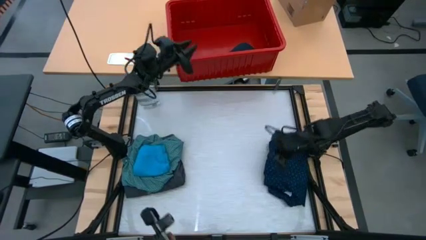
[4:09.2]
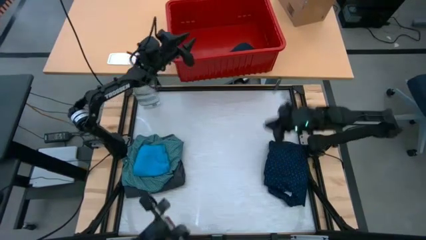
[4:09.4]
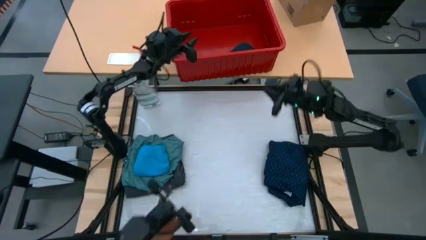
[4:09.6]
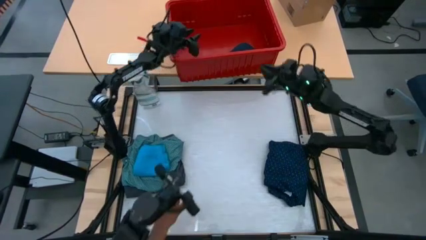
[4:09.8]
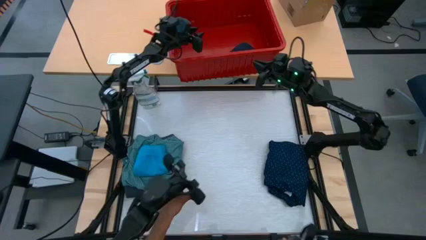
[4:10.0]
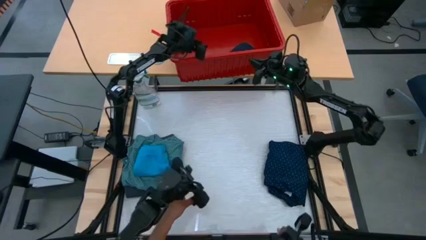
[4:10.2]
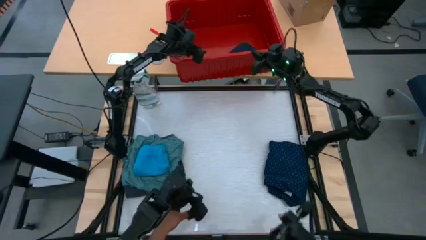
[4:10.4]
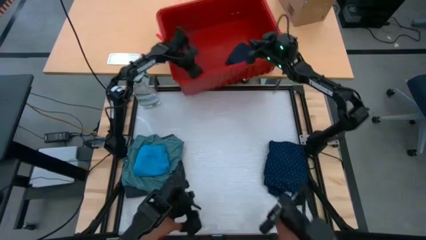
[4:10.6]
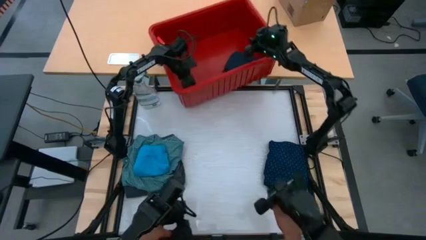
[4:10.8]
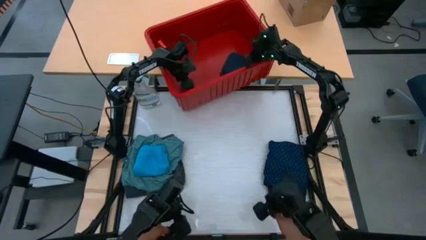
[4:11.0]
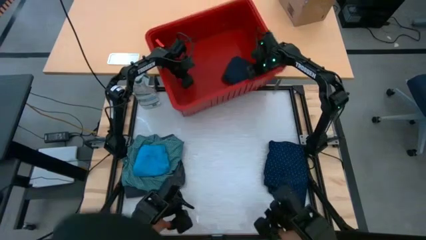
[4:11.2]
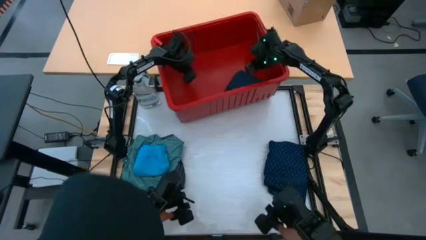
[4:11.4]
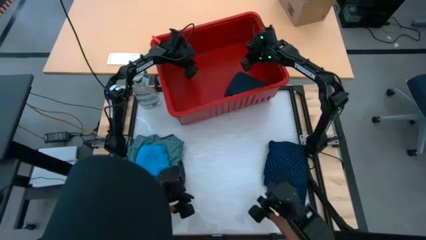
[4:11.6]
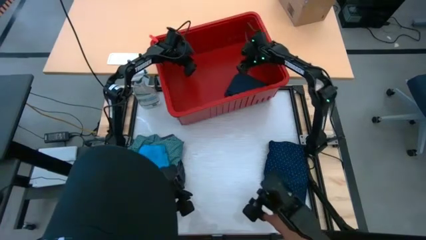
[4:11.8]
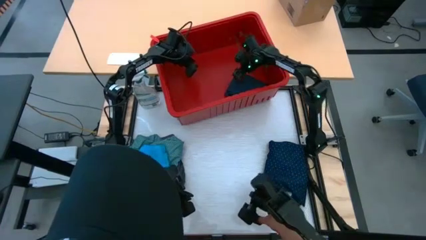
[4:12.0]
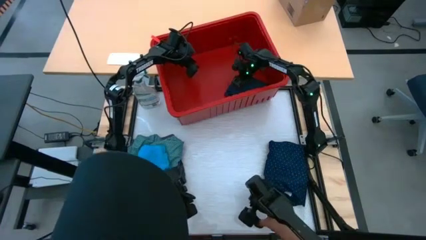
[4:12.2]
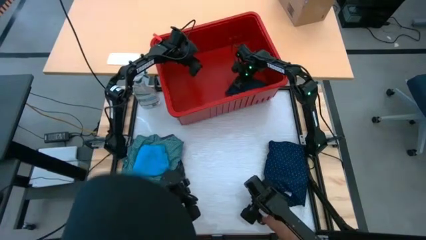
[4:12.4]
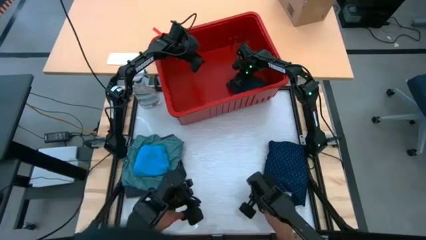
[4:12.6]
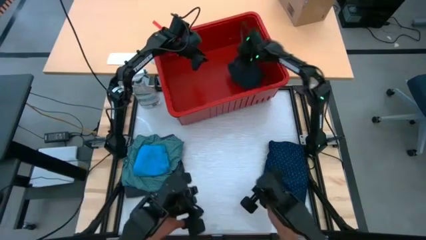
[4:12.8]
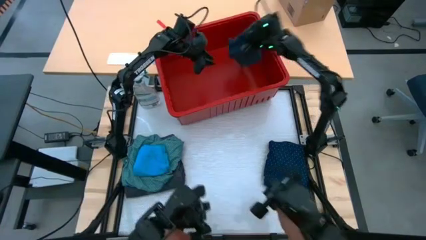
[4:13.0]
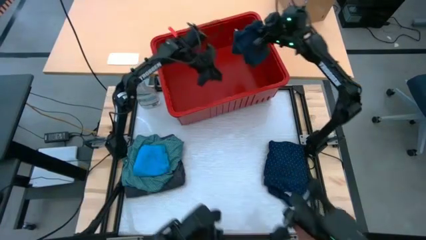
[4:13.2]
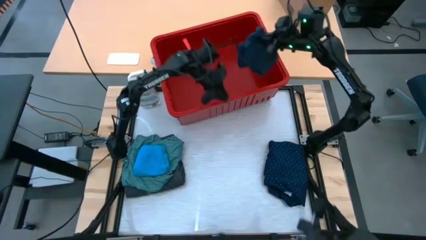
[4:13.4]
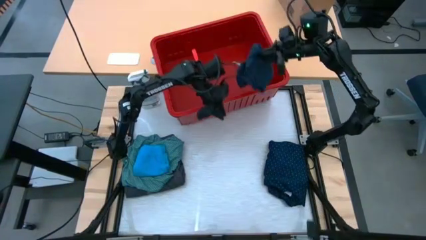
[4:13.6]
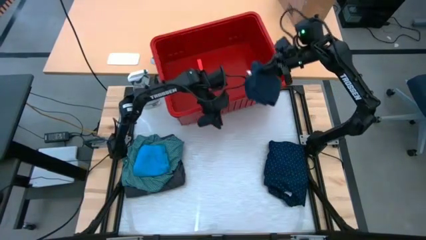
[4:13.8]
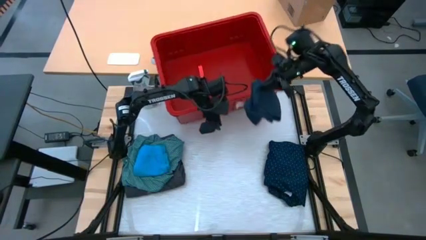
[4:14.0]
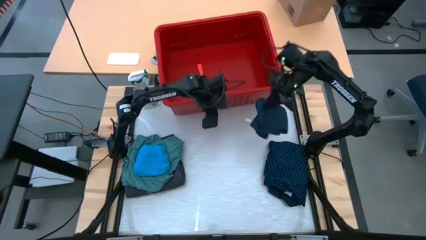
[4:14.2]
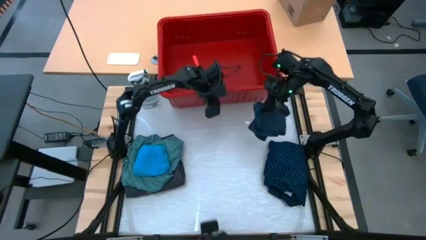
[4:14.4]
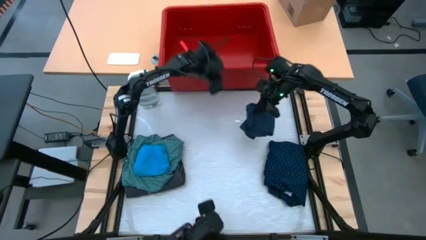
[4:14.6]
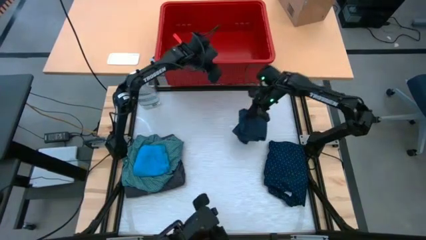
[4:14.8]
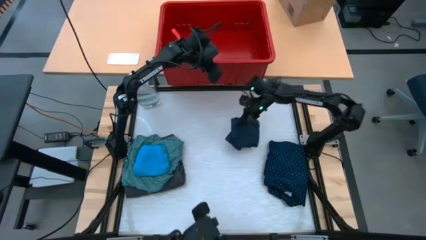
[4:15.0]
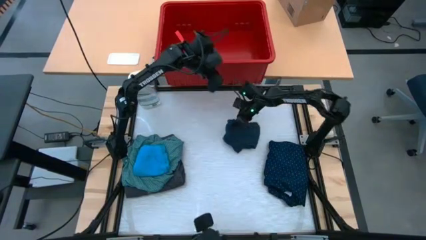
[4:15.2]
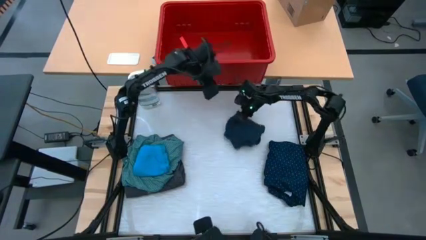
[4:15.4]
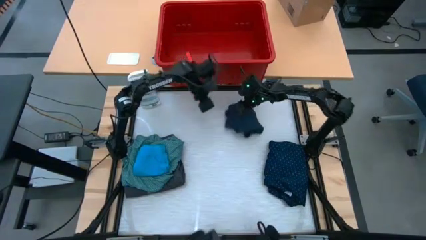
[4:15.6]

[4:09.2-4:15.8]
Task: Fold laundry
Remove the dark blue shorts from the red bin

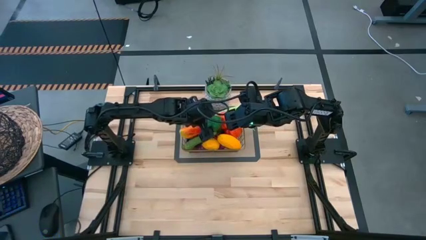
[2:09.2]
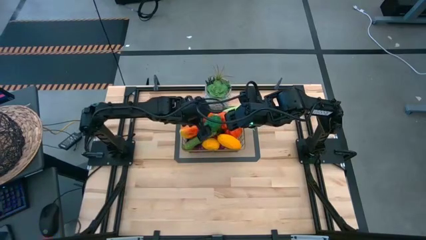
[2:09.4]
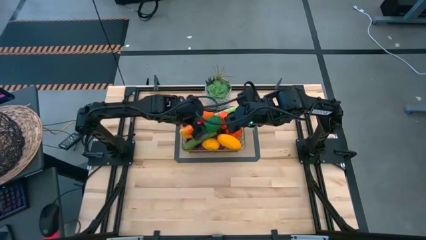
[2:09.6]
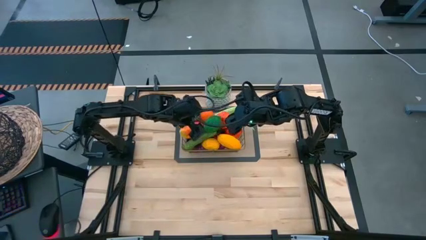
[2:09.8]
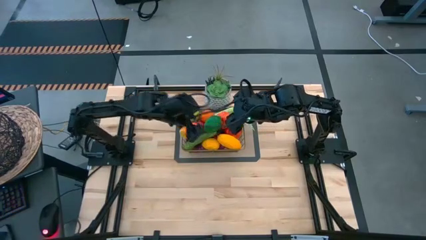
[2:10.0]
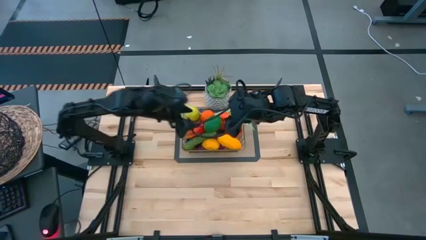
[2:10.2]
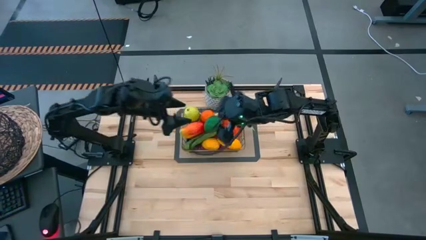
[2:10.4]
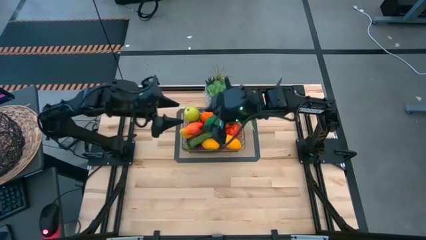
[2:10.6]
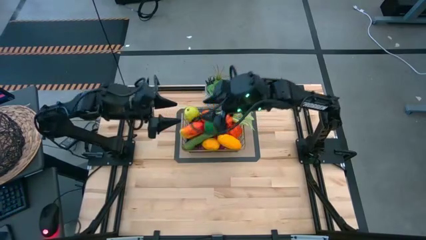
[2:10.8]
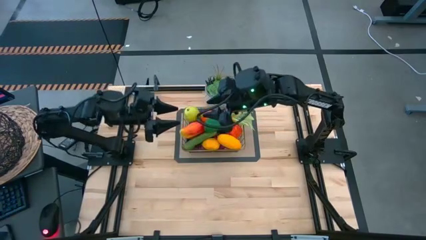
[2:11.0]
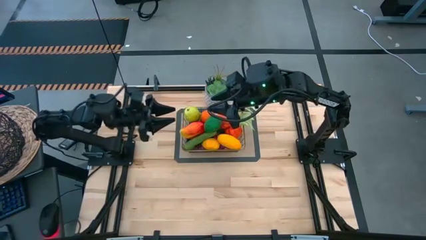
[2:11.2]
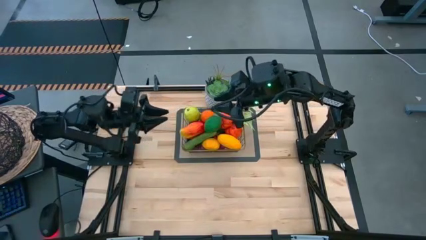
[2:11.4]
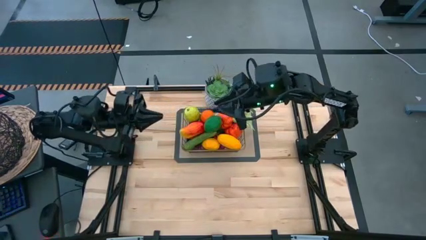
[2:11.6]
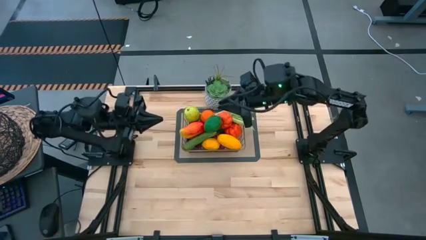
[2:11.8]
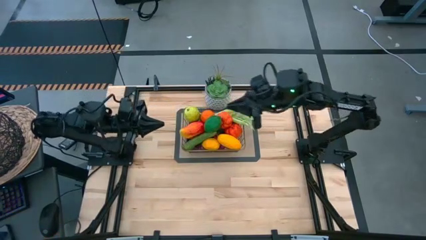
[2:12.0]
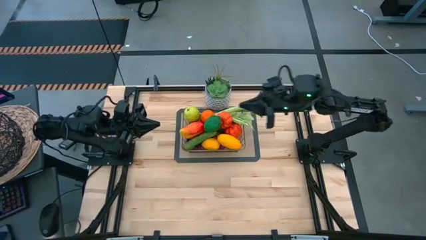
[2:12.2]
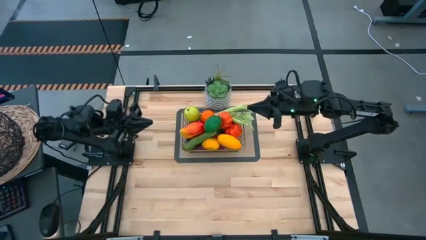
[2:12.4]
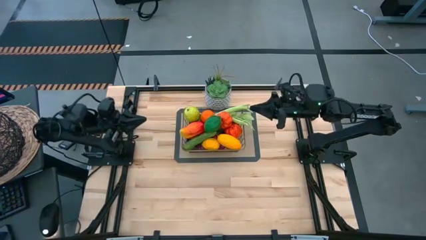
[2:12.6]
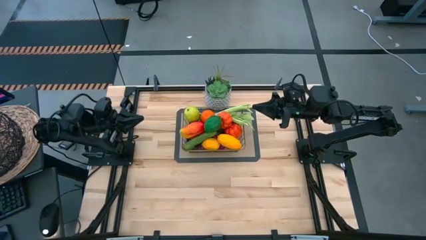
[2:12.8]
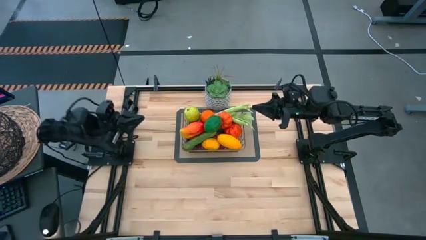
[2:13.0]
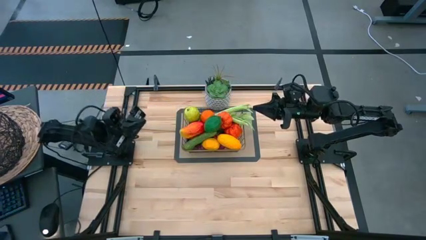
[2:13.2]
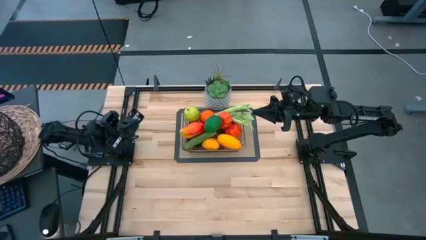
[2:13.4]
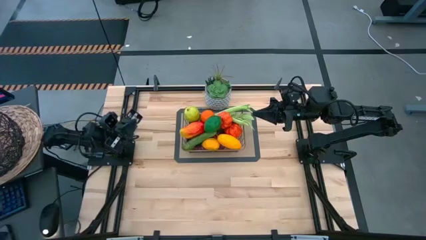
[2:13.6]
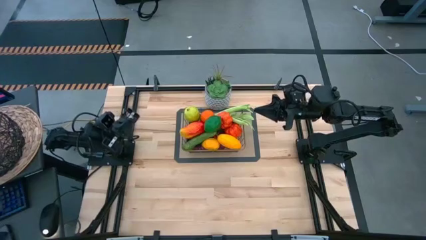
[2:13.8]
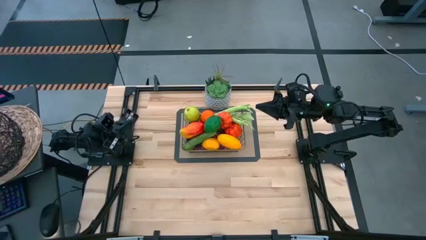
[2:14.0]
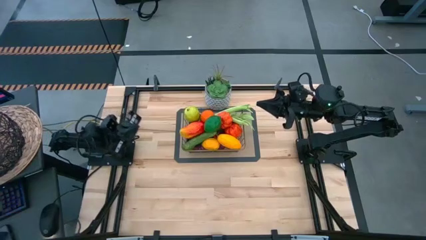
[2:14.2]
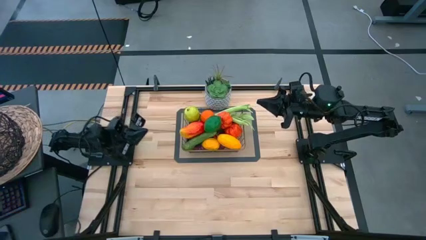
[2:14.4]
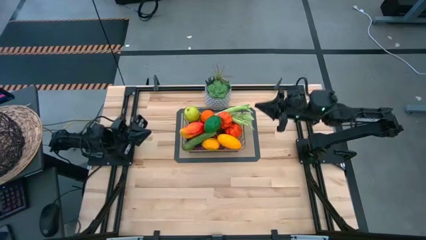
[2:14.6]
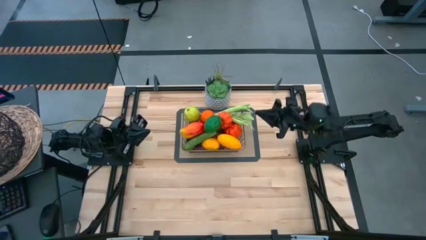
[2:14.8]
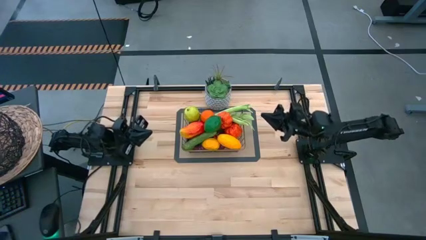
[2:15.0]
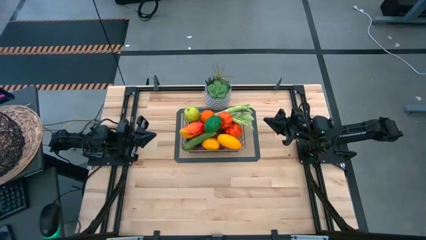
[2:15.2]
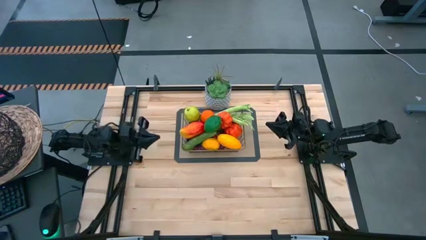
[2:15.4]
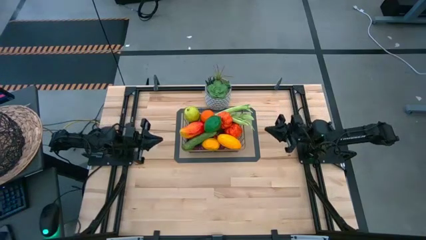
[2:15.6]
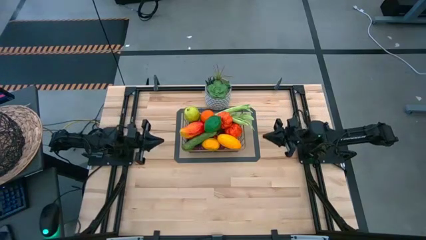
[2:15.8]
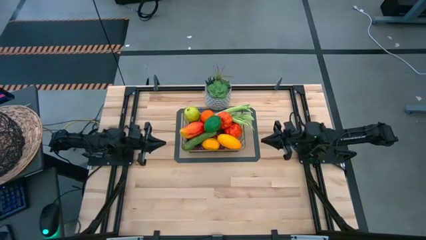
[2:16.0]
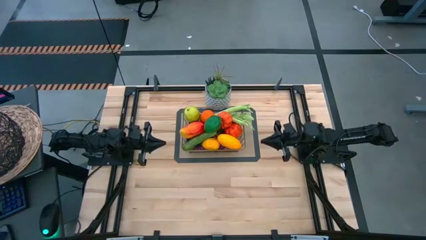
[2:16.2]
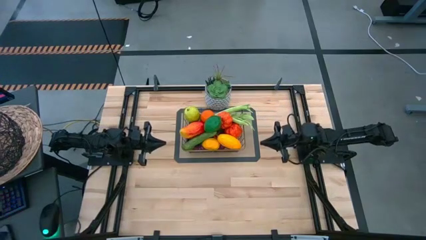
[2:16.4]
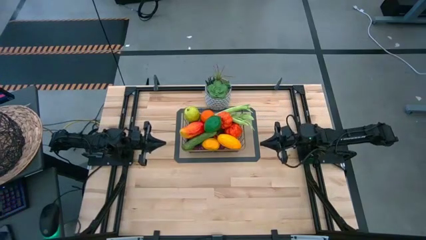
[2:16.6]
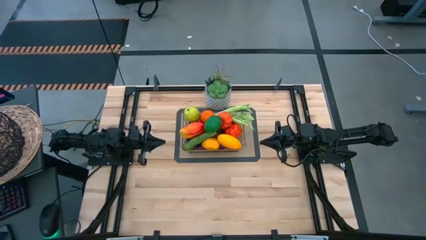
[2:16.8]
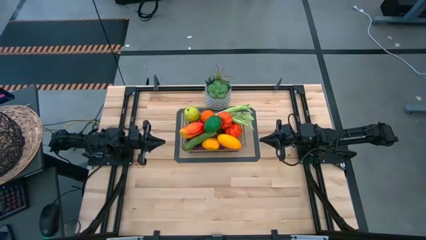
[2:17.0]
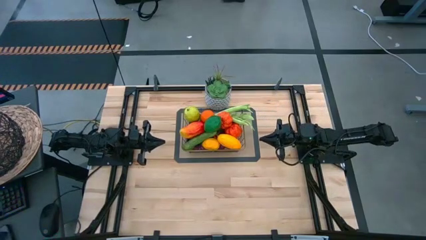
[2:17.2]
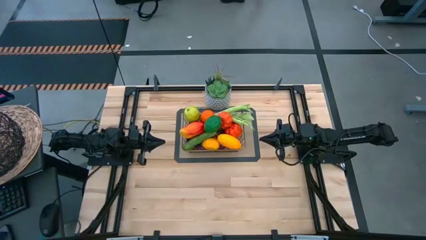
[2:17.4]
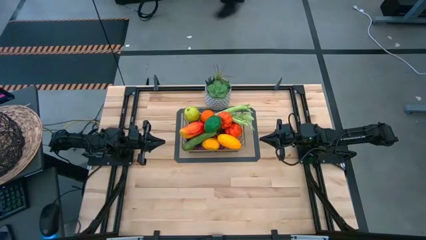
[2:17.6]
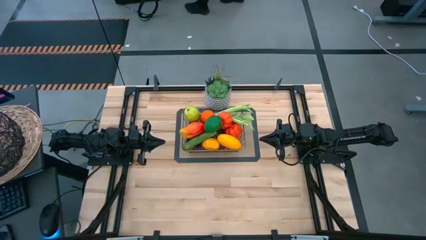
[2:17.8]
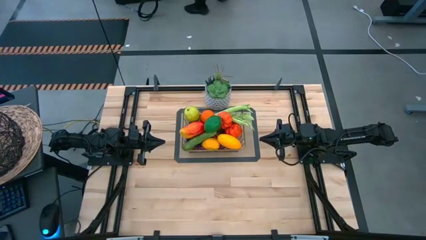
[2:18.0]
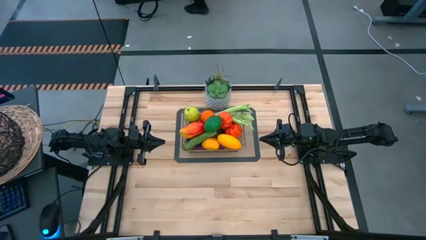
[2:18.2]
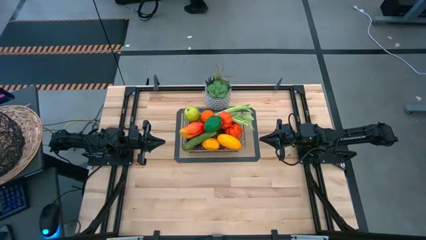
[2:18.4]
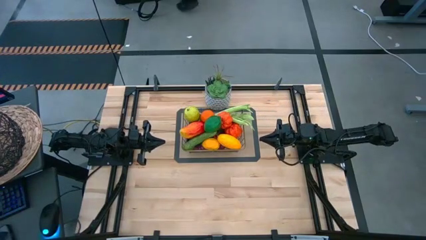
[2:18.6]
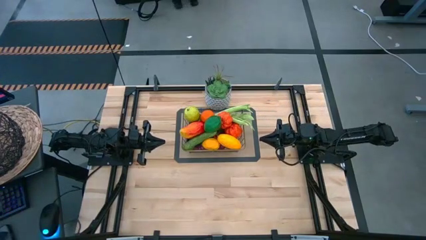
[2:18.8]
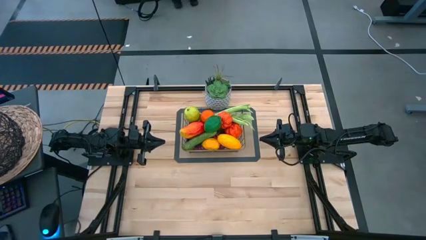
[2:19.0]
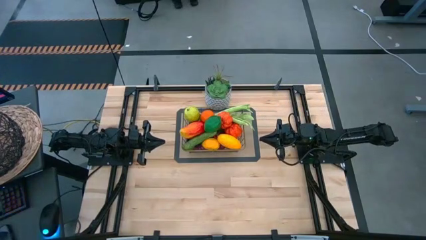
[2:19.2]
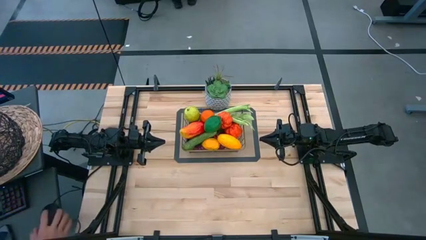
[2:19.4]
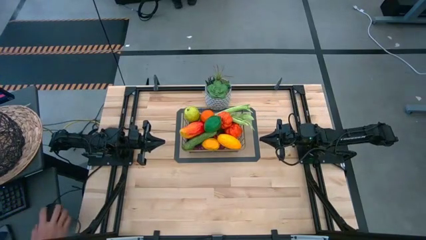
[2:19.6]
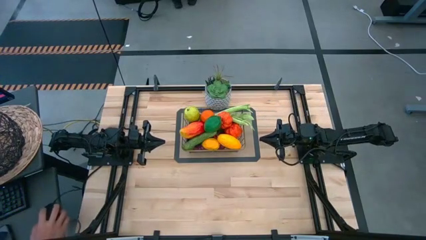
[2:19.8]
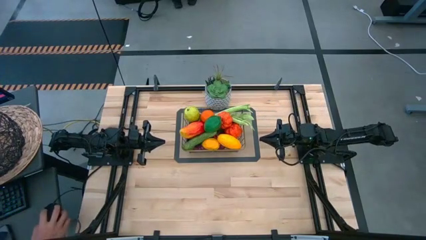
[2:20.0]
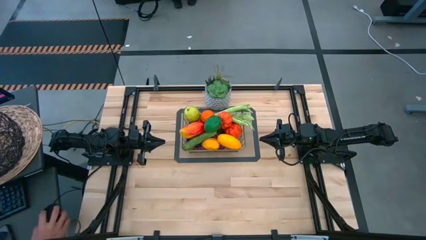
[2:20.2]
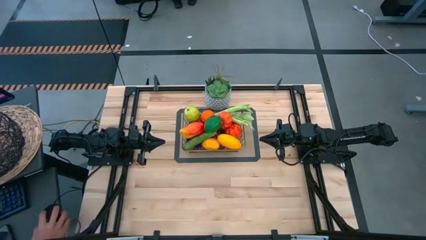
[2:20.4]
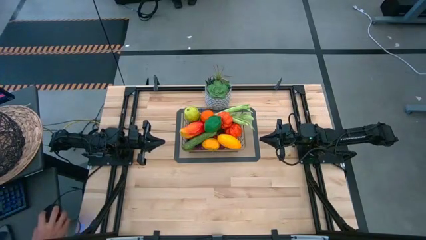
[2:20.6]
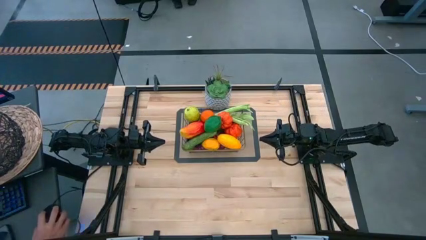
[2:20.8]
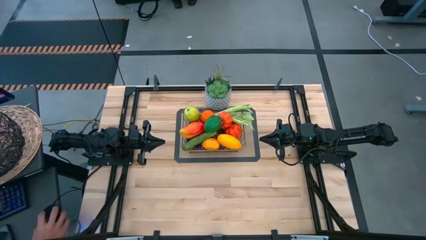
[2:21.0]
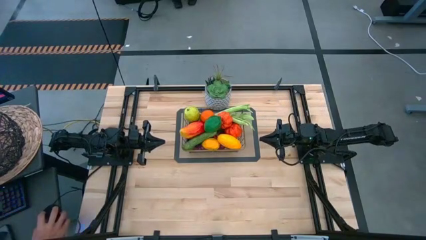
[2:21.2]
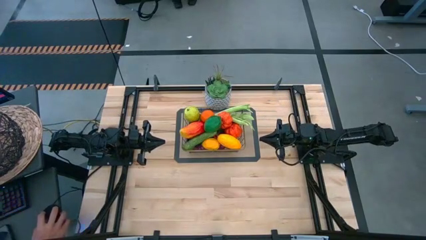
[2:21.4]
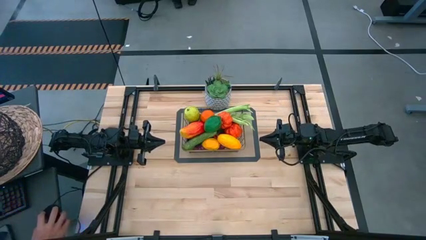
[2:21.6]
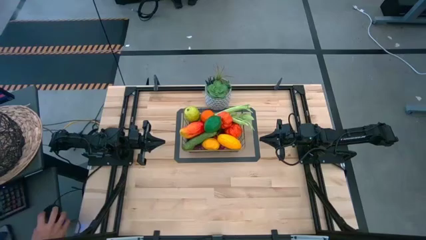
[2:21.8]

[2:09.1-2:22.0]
Task: Build produce basket
Return to Home Position
